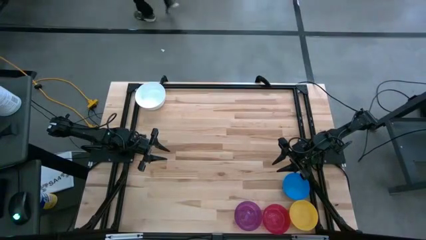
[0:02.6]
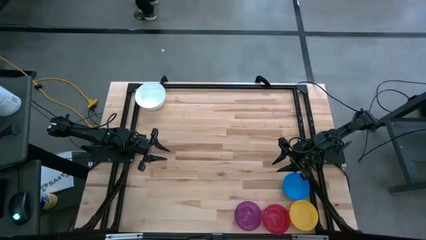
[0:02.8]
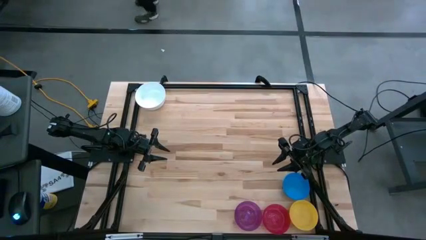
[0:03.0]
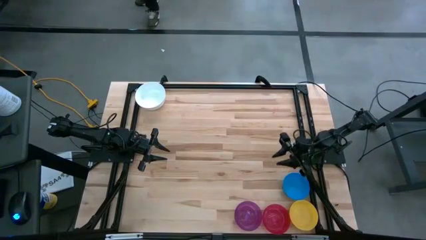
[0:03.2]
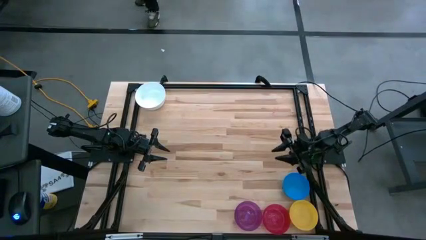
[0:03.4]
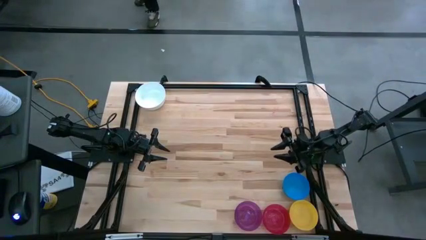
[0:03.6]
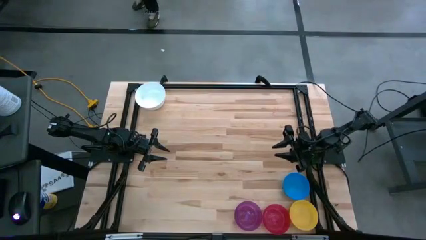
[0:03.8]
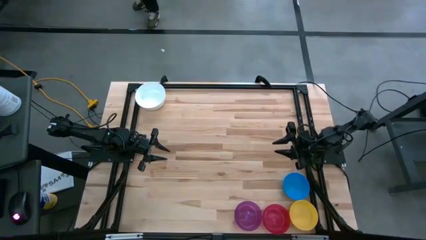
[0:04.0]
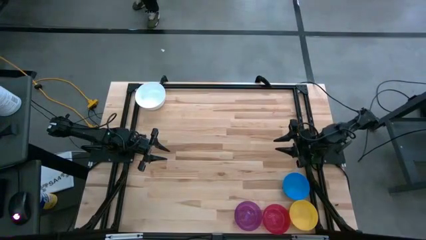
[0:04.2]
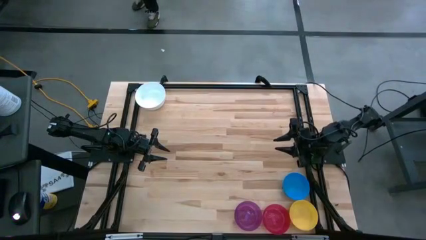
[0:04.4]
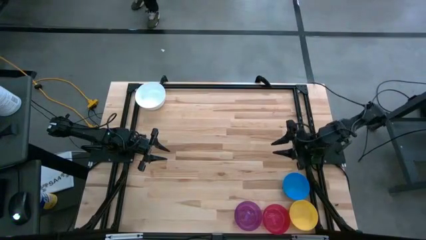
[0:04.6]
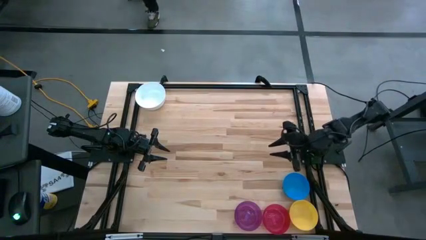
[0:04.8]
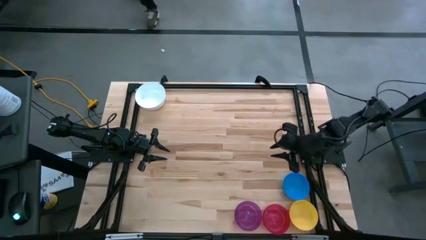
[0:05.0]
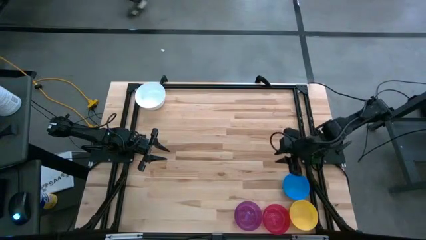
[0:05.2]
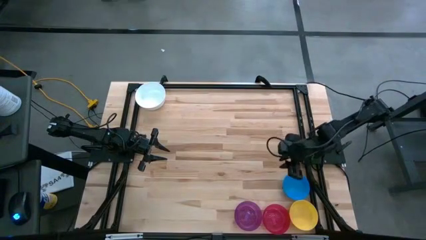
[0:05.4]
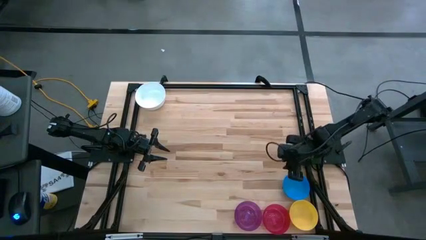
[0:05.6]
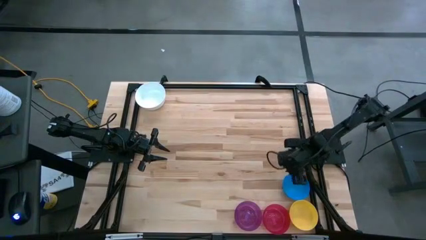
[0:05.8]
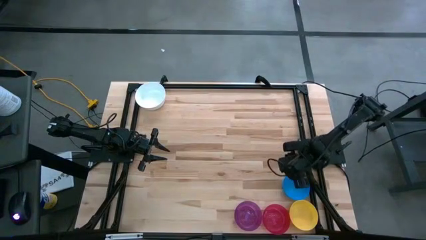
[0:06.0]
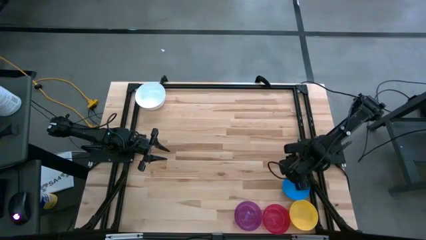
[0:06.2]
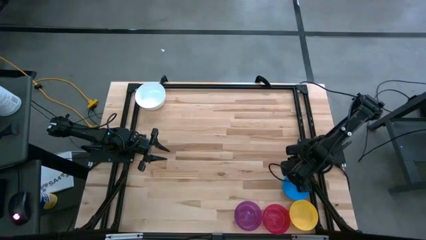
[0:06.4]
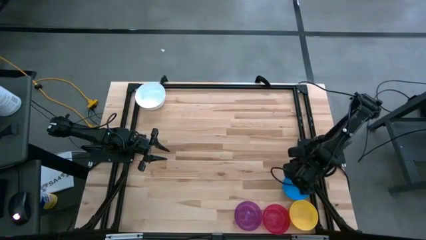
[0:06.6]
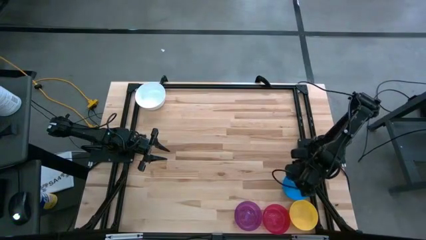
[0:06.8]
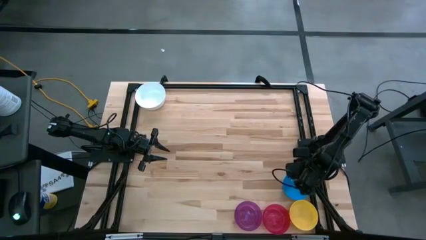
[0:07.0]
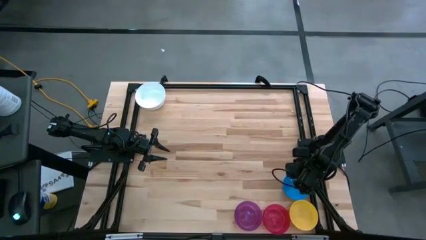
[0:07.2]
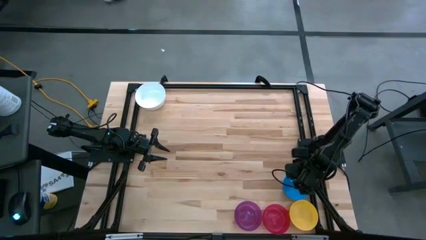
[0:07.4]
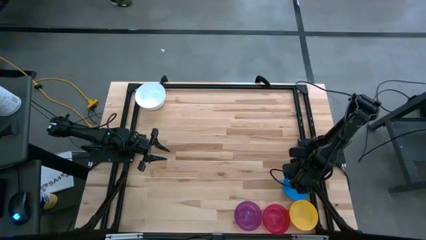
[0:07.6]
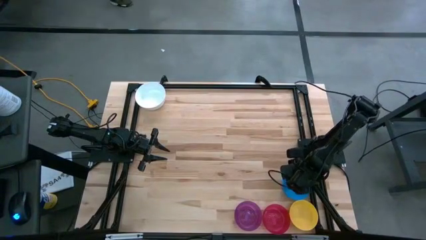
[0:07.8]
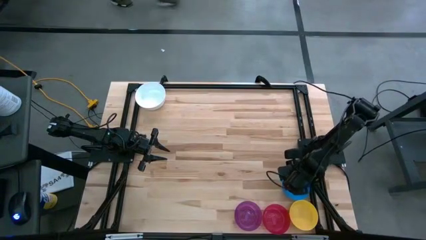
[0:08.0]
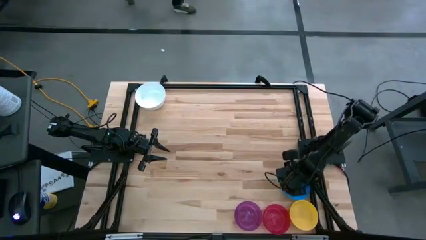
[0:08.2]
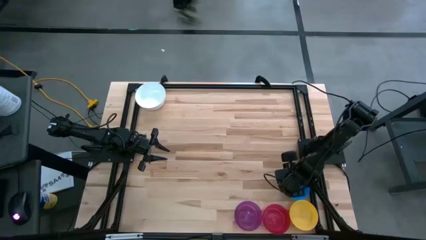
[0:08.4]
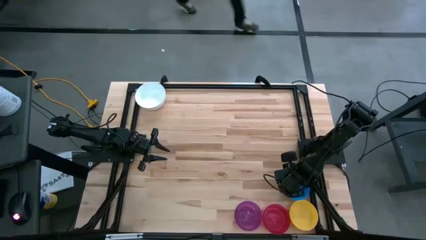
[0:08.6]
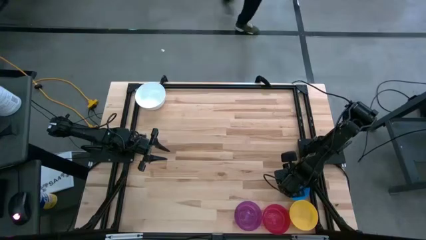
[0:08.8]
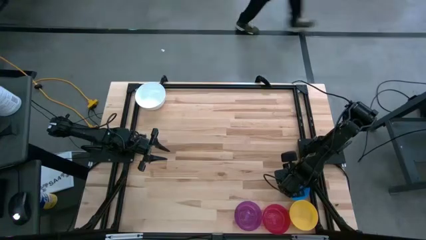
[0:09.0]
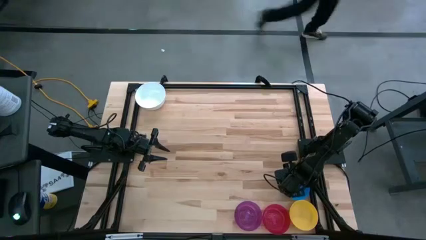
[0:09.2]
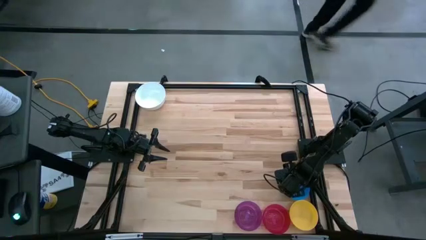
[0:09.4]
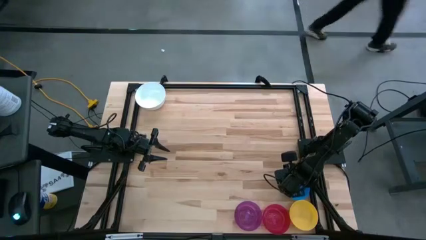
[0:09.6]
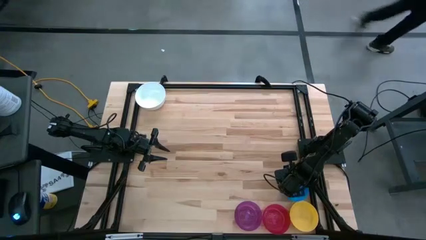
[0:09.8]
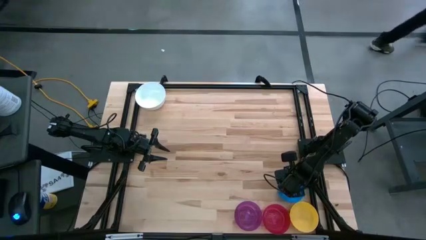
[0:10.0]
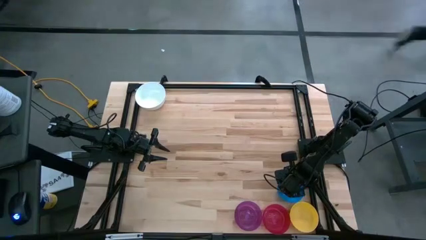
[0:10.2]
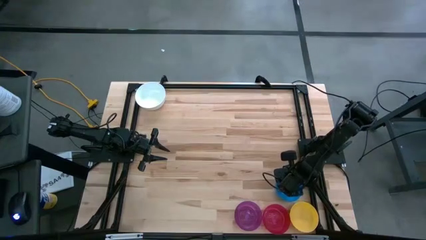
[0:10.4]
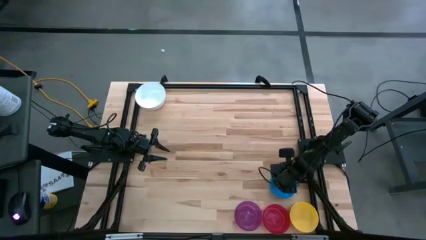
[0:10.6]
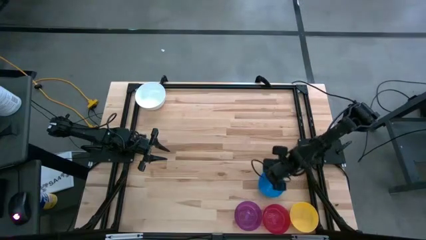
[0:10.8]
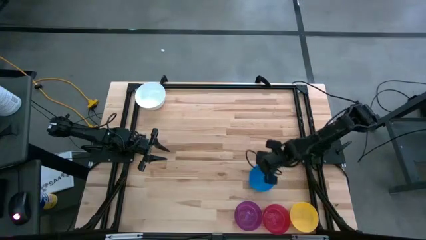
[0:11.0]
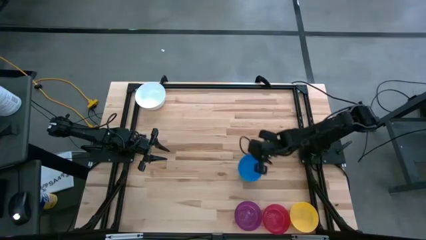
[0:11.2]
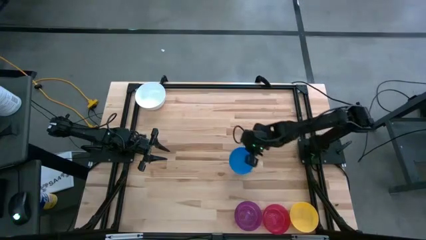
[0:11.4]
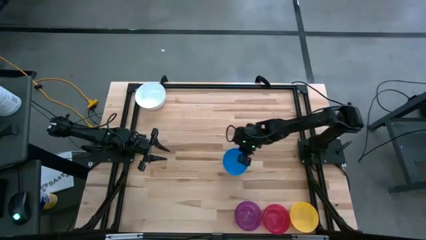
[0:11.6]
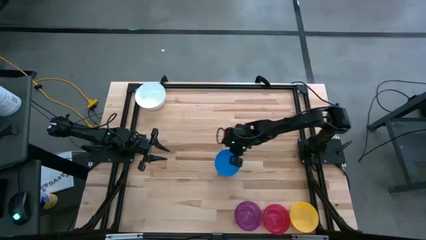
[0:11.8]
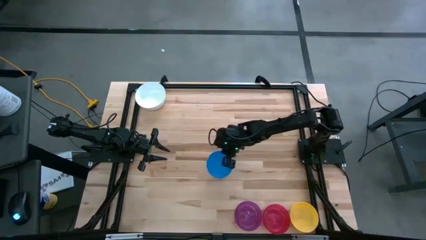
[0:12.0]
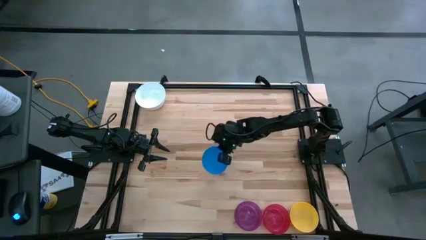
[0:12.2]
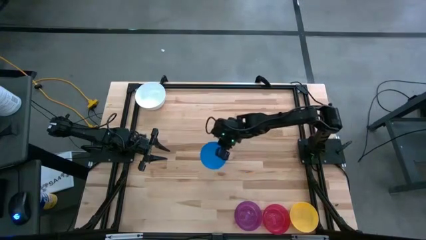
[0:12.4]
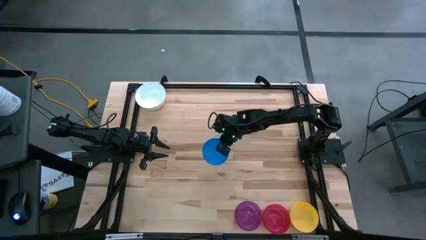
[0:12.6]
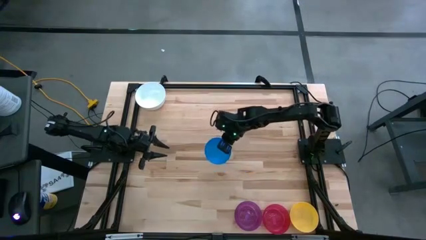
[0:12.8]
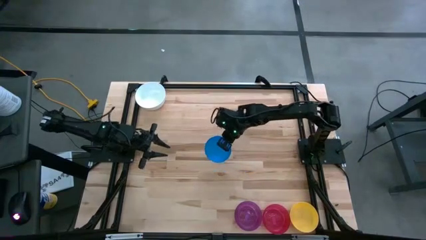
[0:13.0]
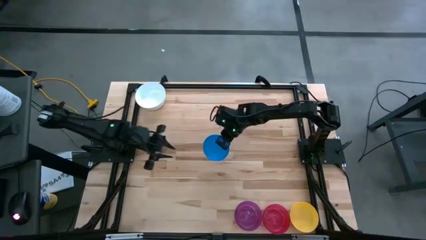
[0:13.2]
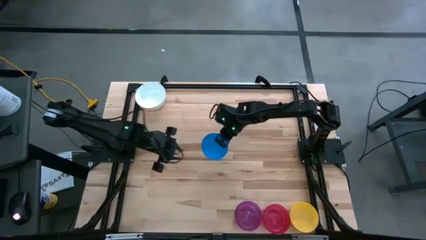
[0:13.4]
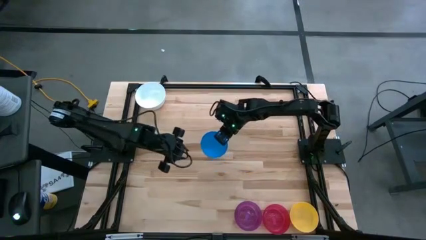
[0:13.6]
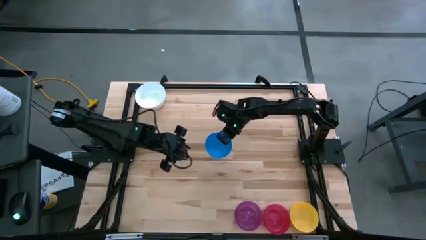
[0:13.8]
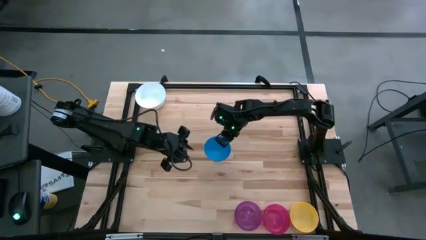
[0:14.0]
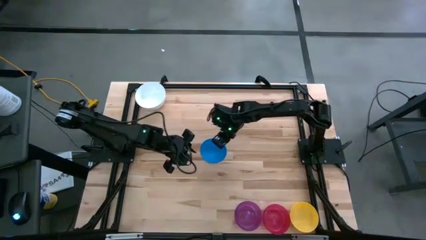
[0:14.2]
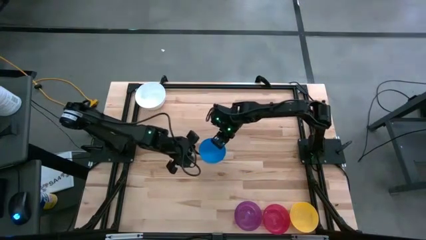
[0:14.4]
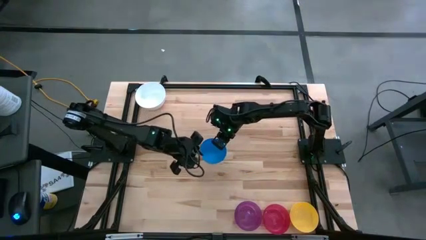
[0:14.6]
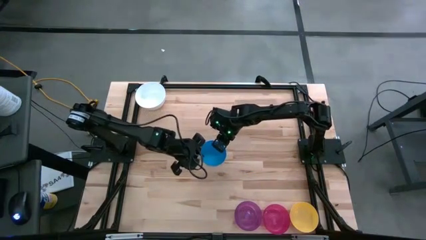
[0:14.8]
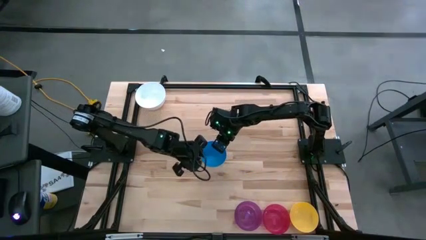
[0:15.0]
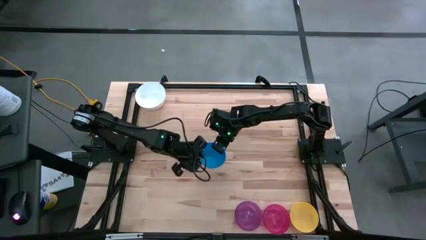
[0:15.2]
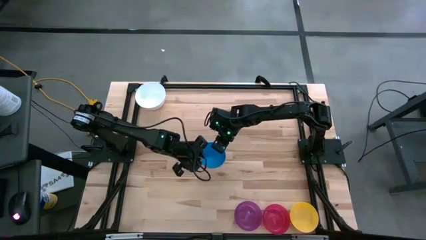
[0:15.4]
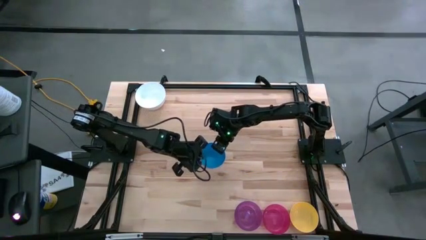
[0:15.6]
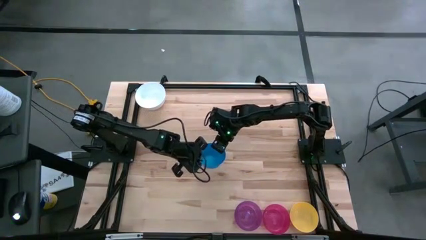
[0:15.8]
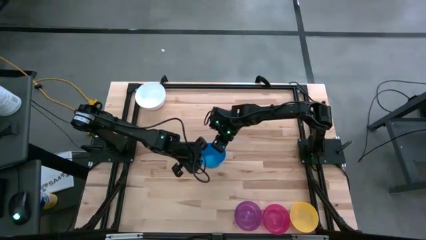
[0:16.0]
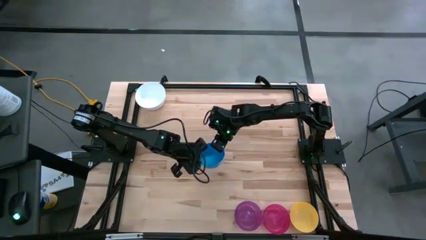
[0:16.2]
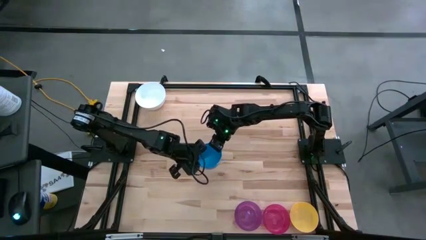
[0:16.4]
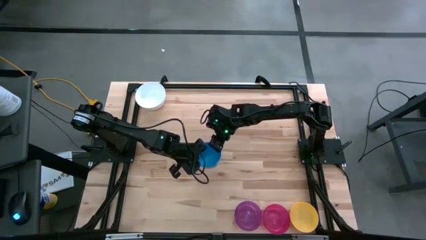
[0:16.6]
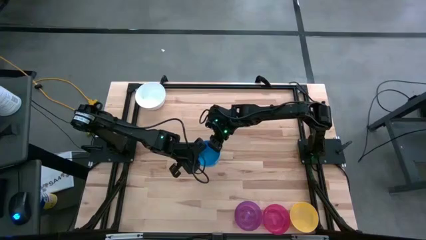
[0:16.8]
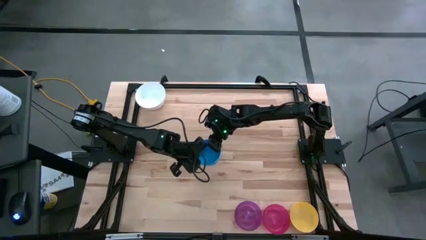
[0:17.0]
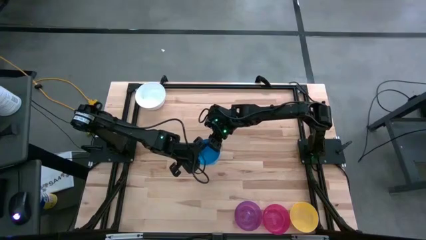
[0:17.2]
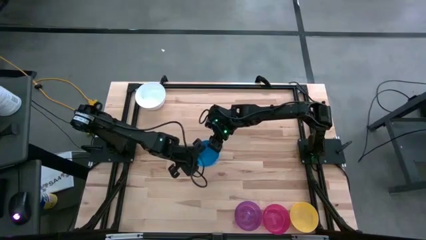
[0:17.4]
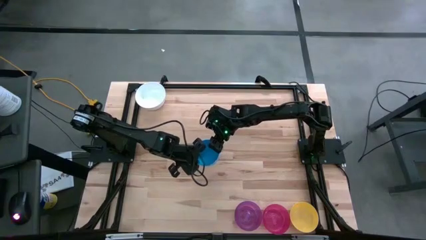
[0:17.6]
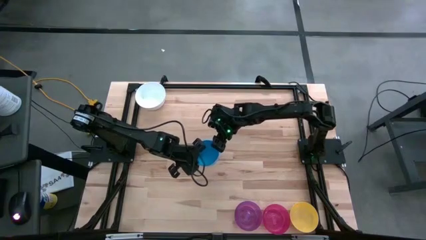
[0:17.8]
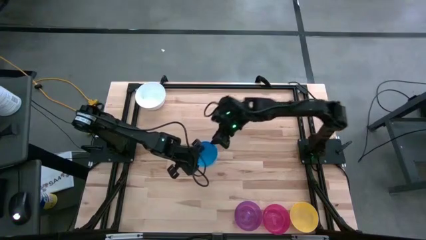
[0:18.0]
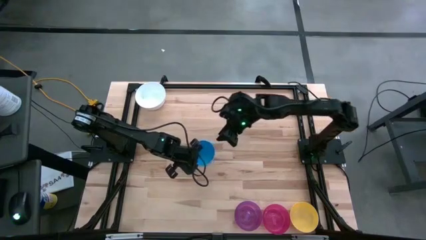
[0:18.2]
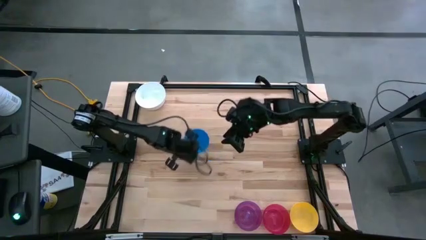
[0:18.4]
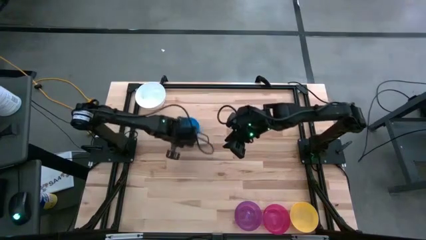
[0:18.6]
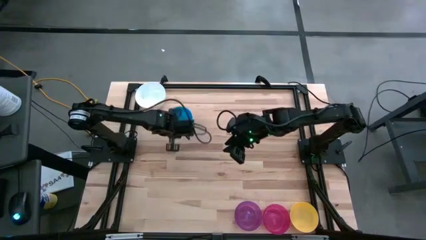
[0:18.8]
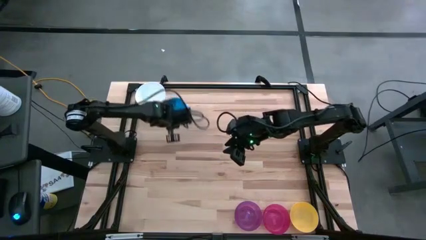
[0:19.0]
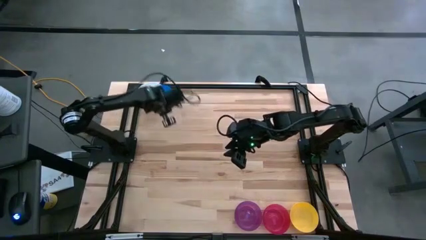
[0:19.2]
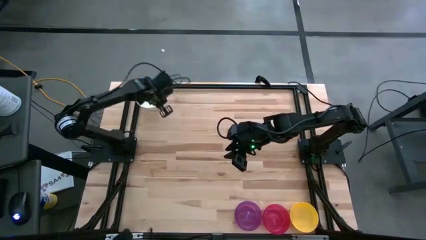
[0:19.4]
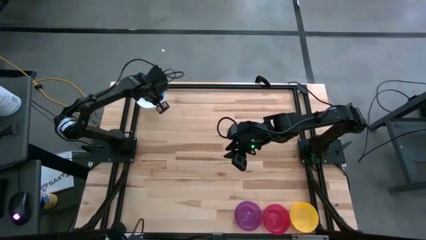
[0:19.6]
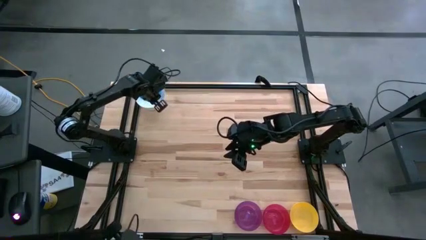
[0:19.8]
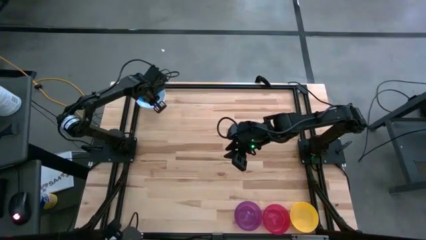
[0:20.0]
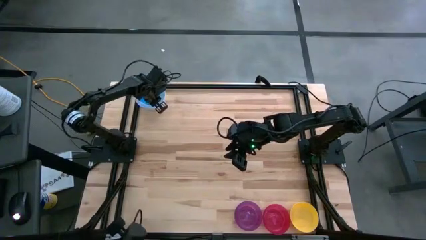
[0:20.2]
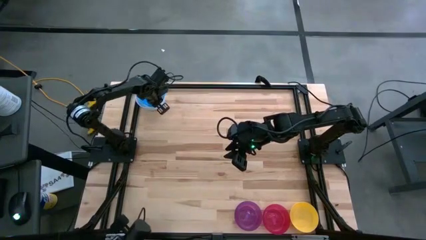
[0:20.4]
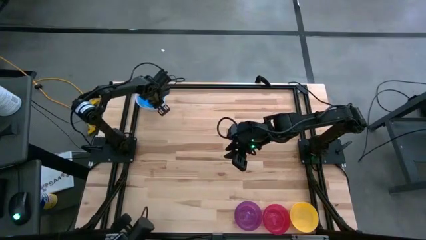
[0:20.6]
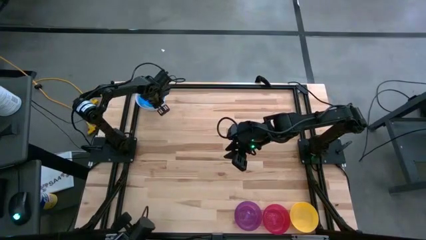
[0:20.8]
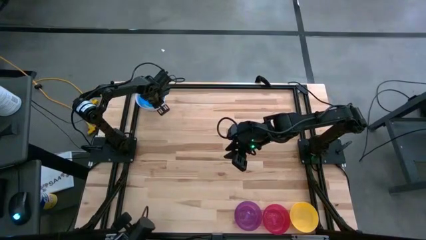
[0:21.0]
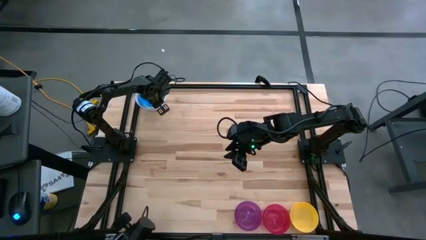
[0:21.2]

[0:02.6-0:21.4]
Stack the blue bowl on the white bowl
